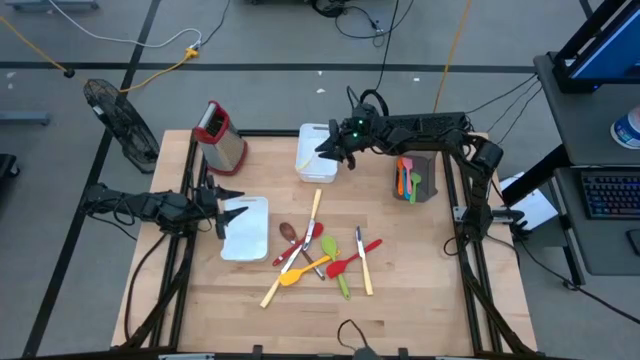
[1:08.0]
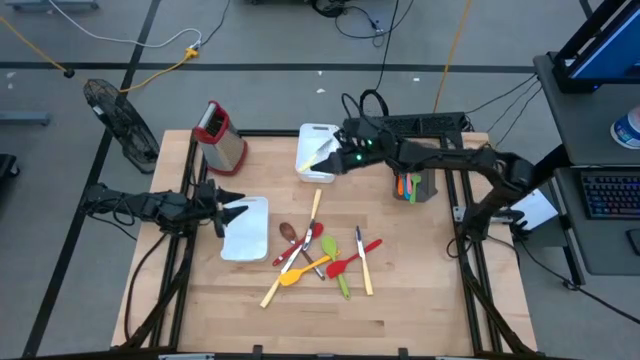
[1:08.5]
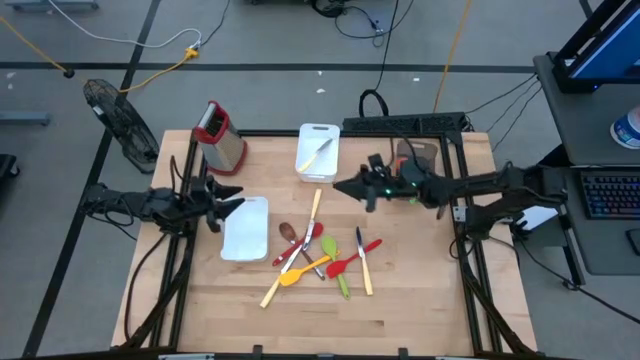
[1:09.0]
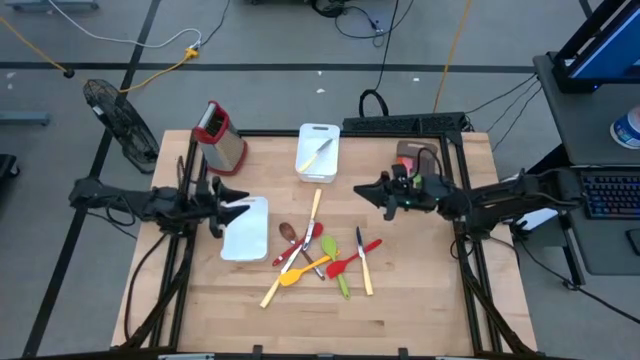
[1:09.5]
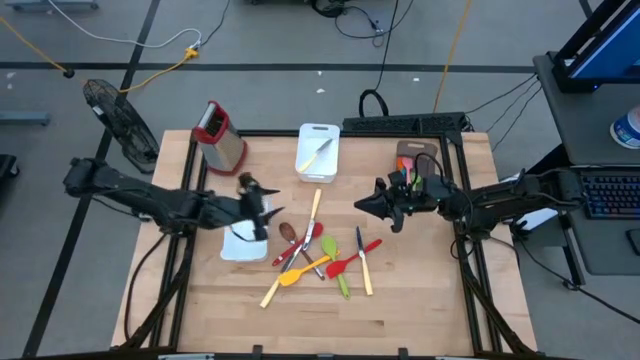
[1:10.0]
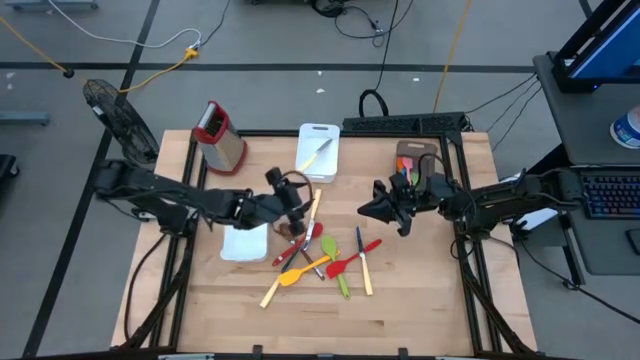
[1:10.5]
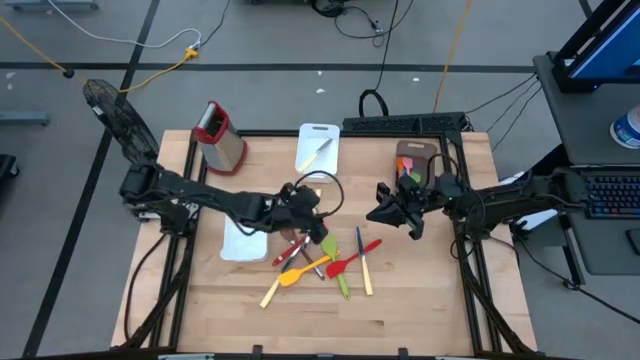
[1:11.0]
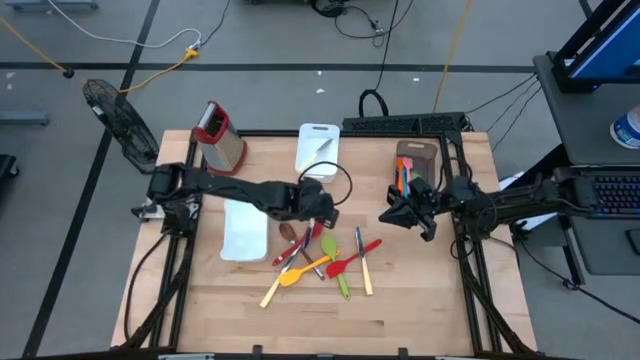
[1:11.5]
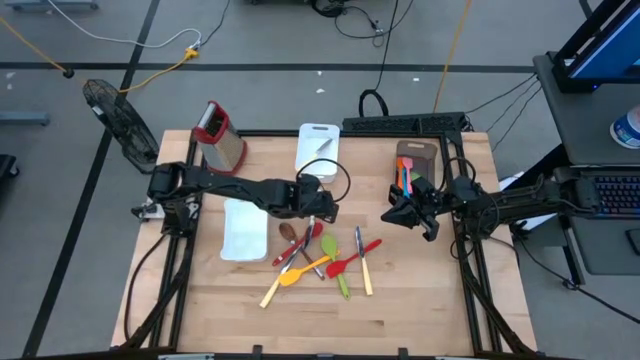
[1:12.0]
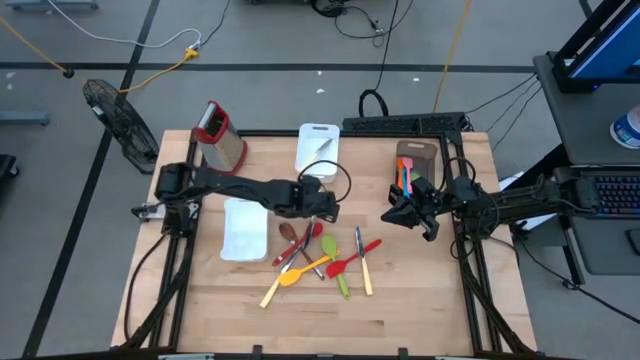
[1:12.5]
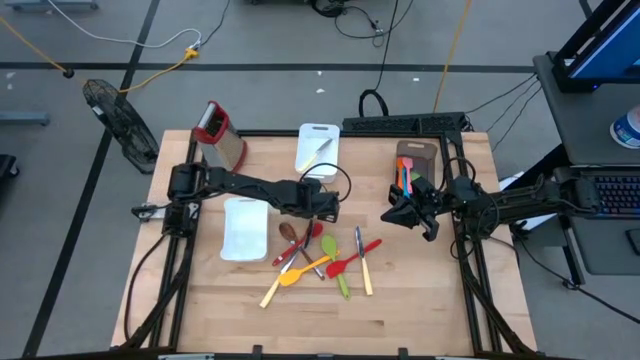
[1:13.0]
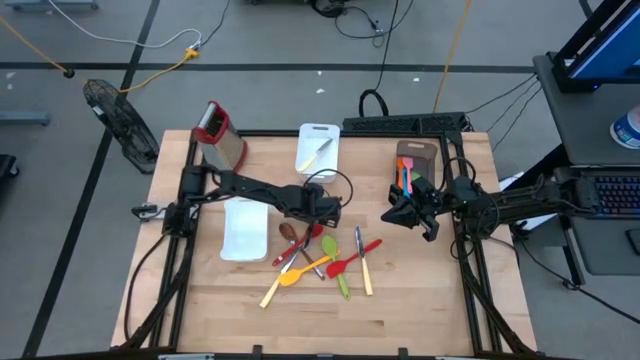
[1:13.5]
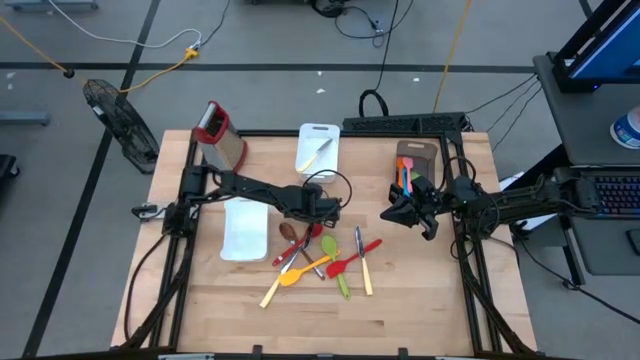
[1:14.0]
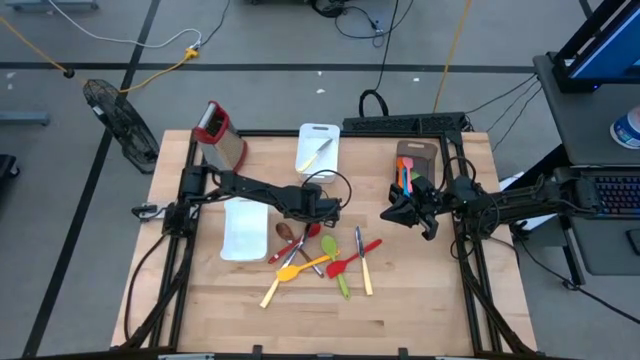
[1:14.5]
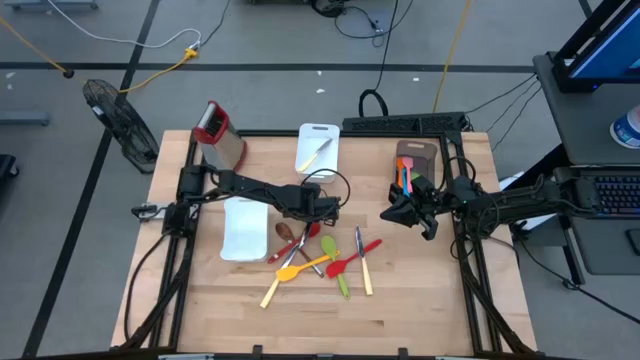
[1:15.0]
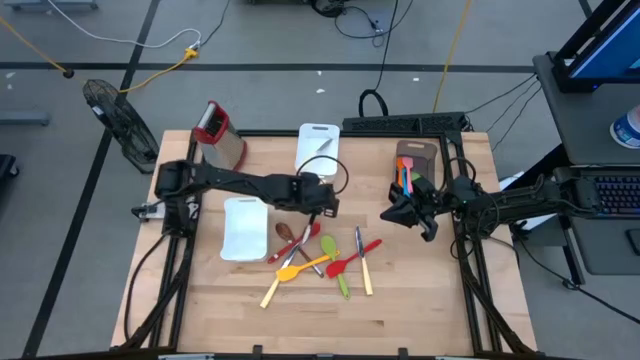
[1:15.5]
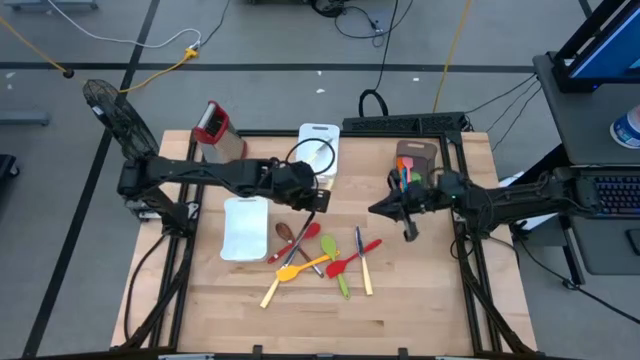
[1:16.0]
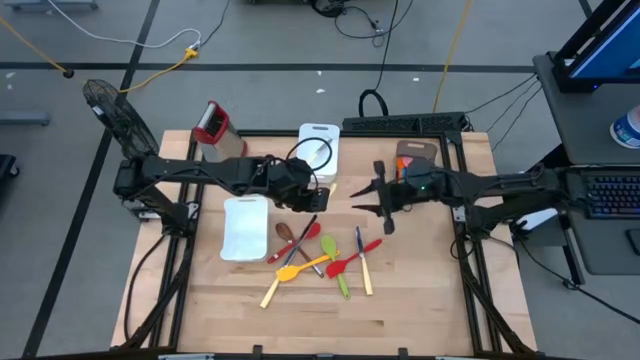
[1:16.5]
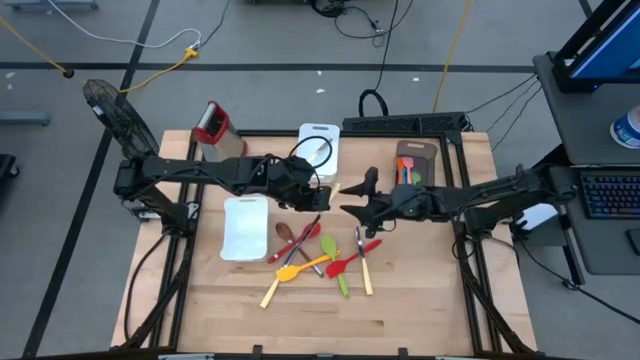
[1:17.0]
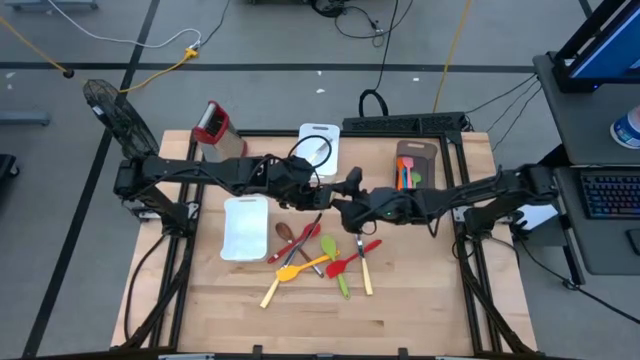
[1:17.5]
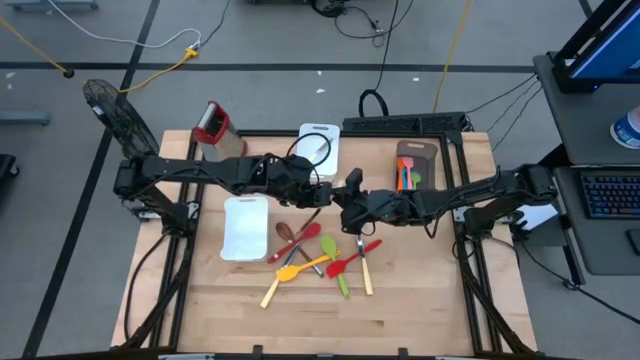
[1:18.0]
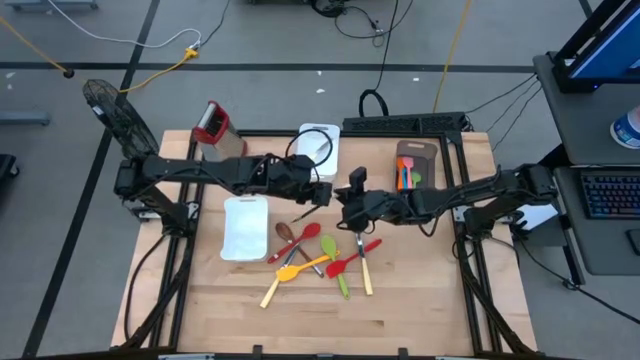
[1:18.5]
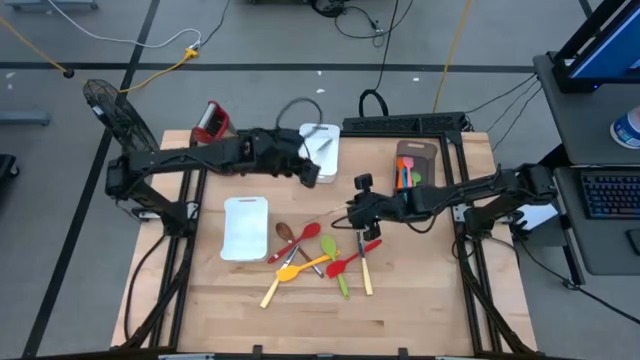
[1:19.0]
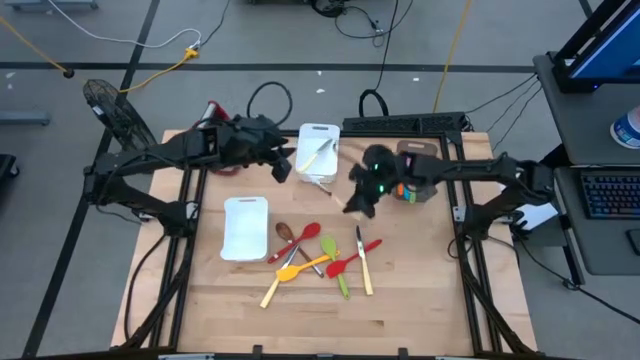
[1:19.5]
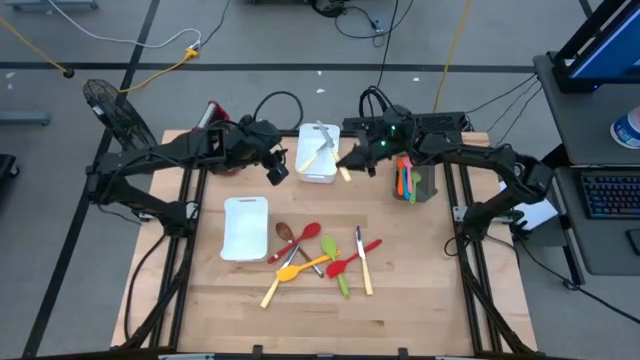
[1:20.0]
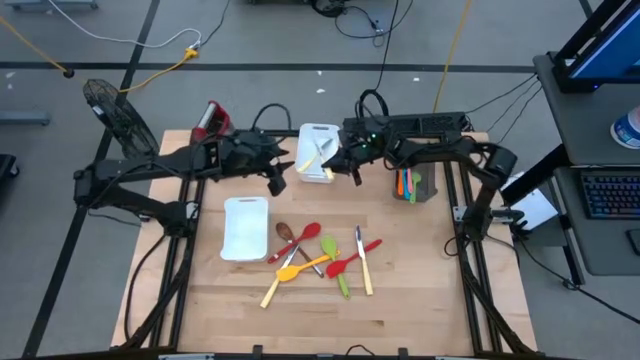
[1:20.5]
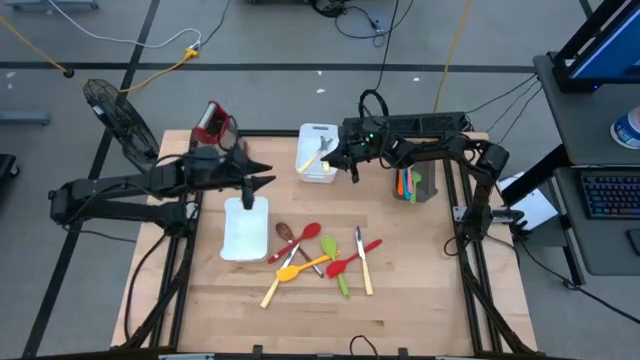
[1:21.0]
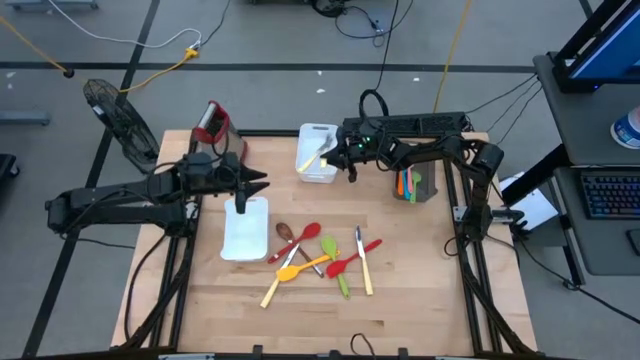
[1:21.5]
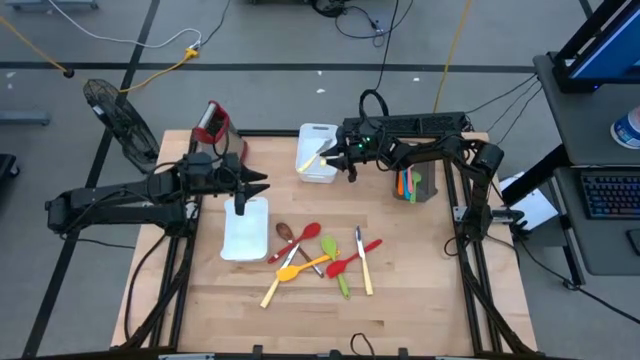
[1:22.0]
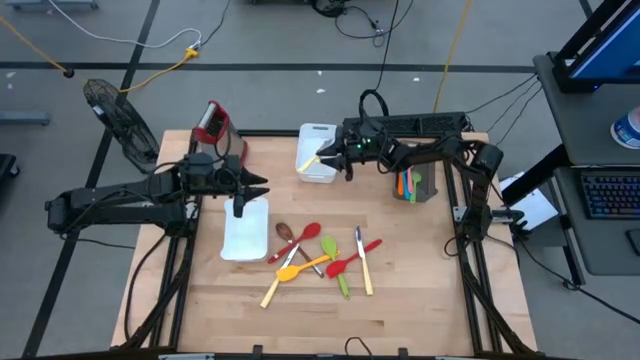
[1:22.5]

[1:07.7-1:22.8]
Task: Pick & Place Kitchen Items
Put the yellow knife into the top white bin

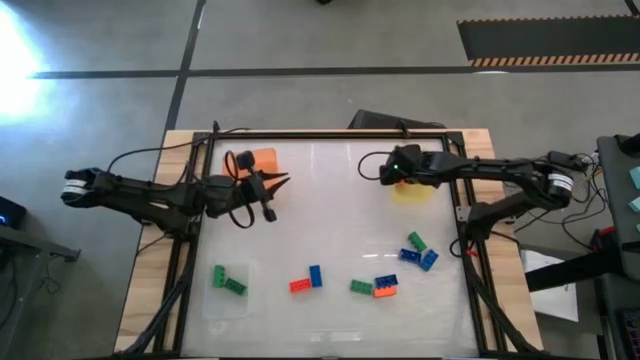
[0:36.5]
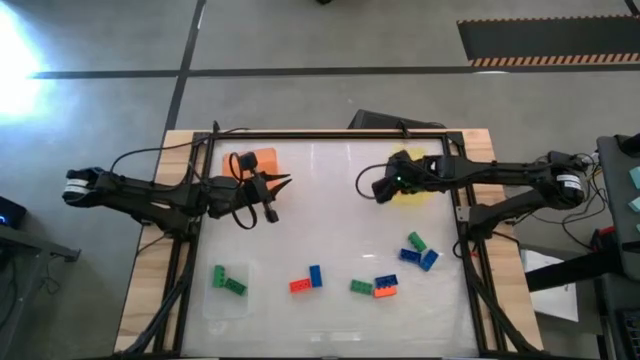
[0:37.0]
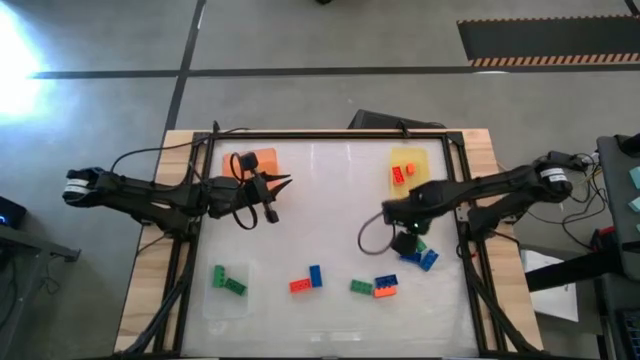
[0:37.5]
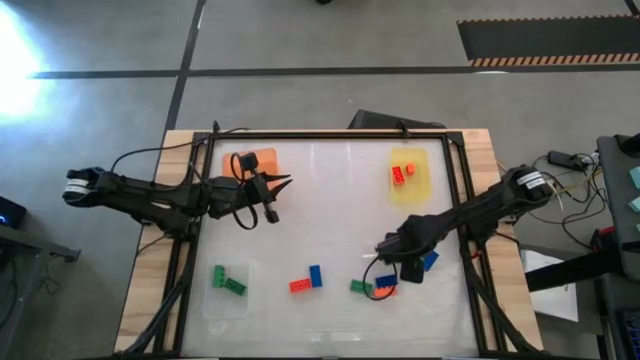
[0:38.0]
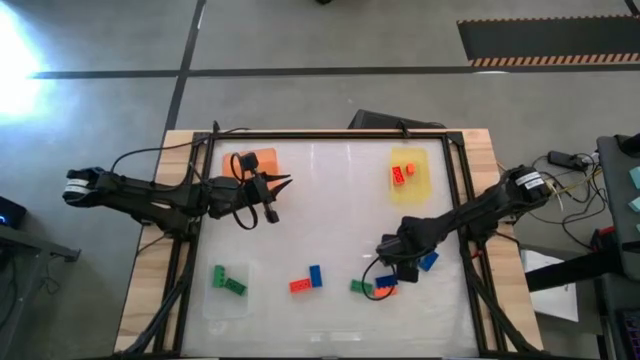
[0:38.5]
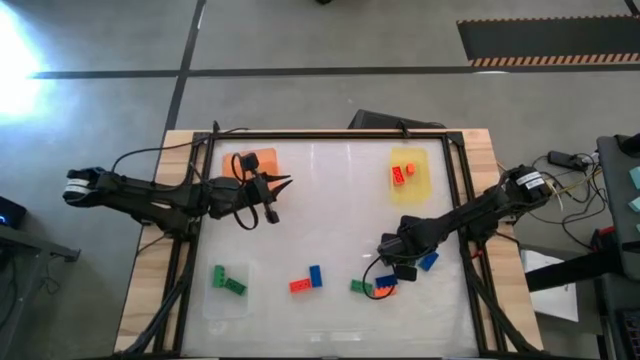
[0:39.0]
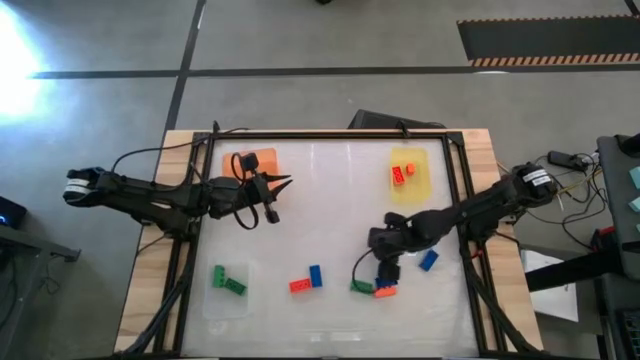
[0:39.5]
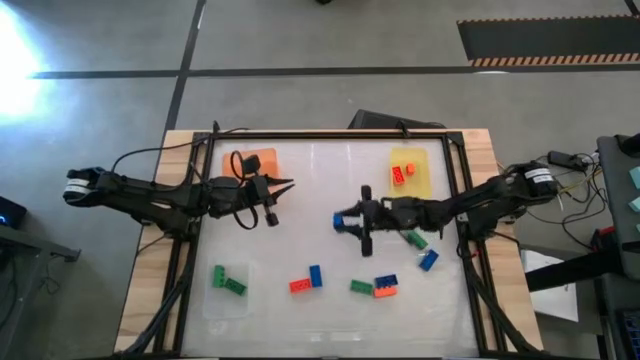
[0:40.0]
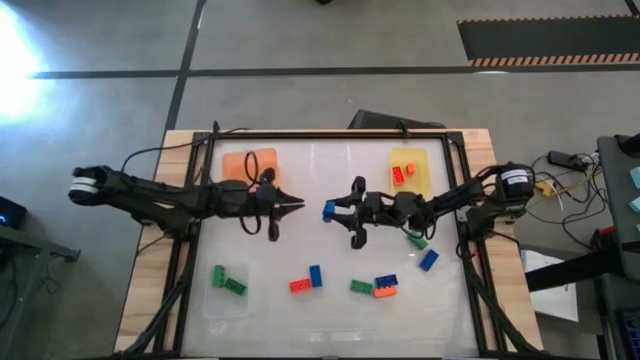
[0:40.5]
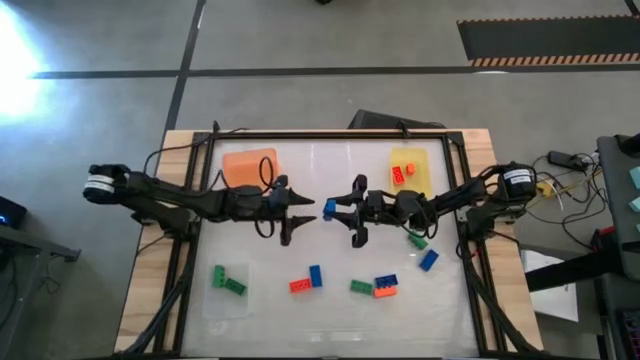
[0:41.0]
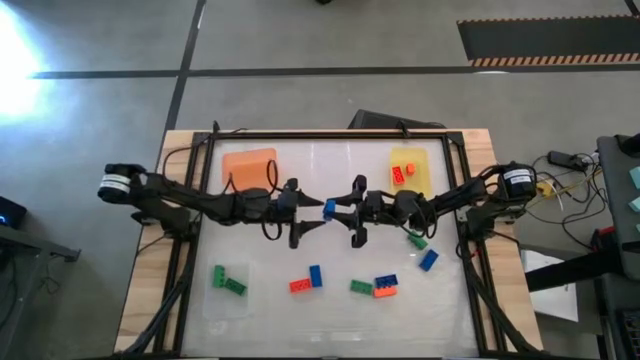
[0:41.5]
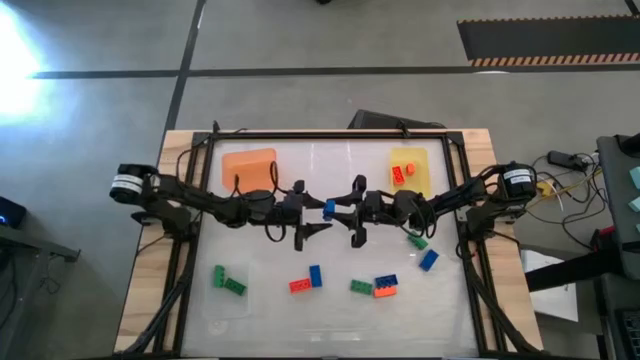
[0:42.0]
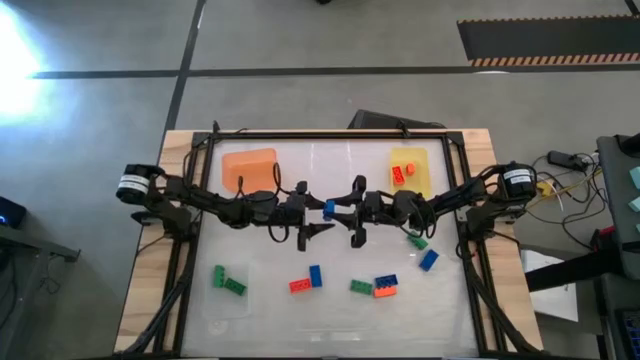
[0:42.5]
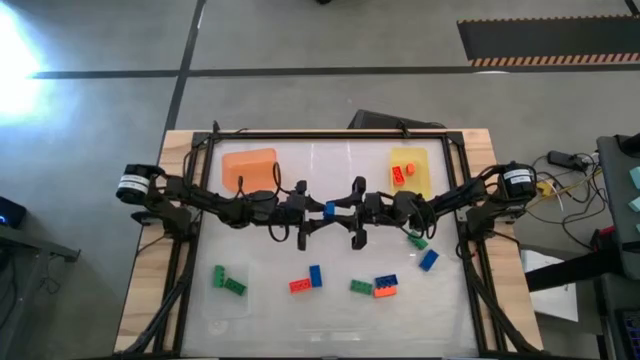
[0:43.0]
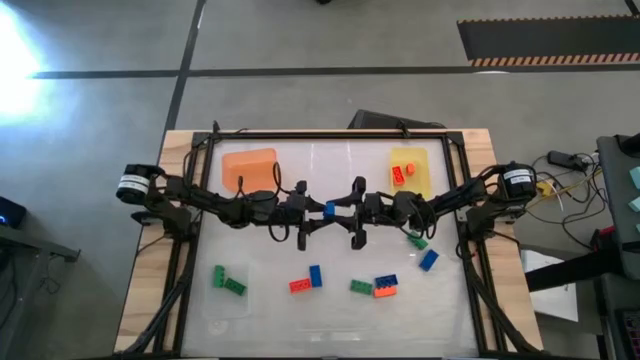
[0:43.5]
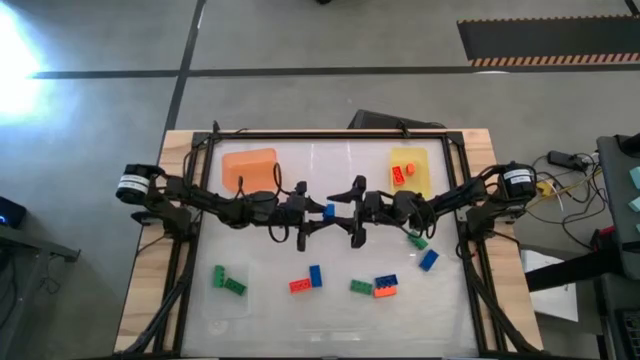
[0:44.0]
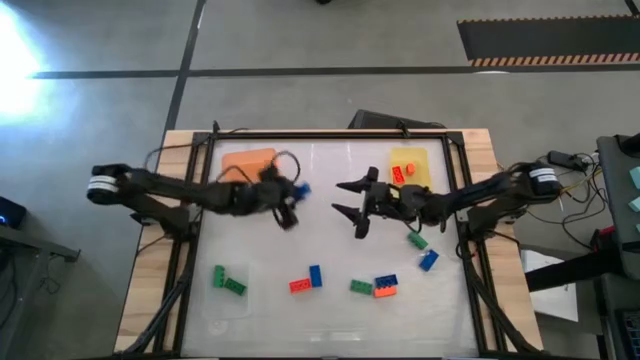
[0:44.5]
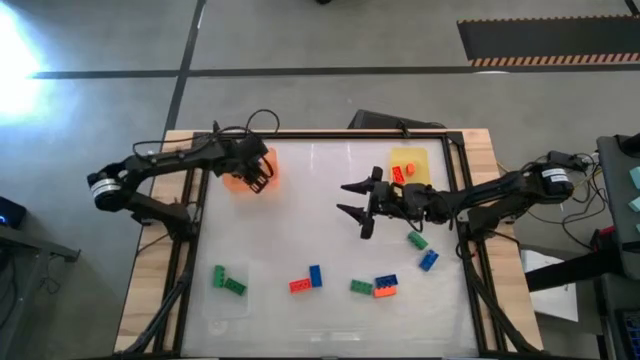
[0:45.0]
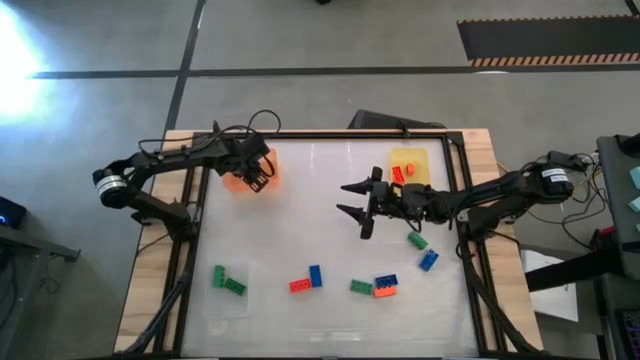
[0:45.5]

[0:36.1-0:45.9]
Task: Sort & place blocks by color
Put the blue game piece into the orange bin
